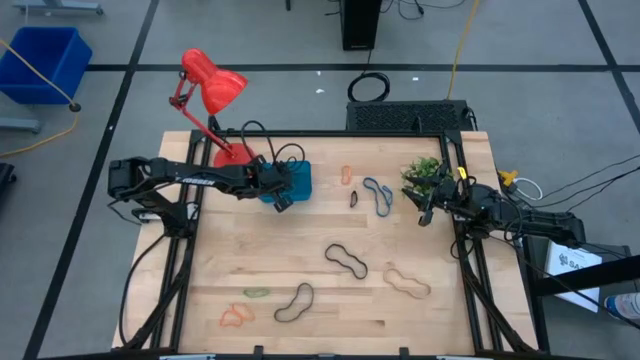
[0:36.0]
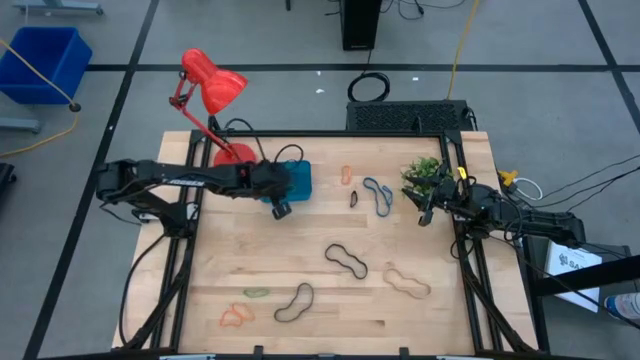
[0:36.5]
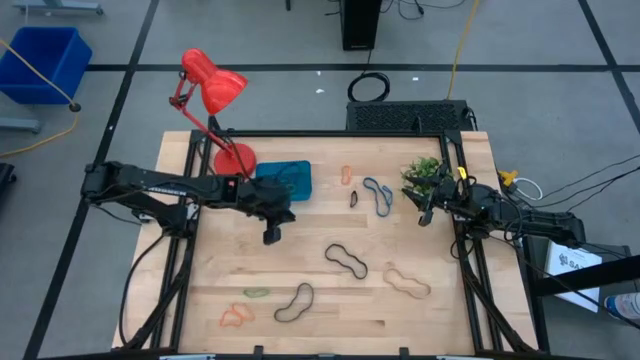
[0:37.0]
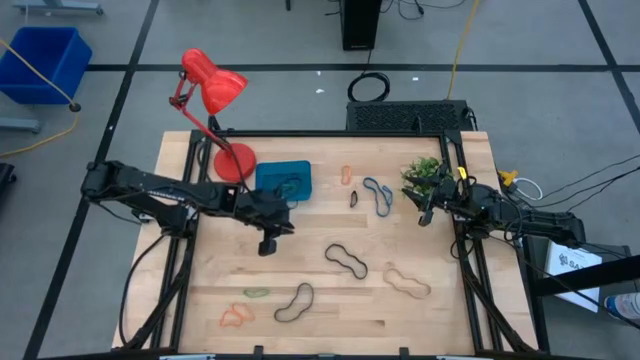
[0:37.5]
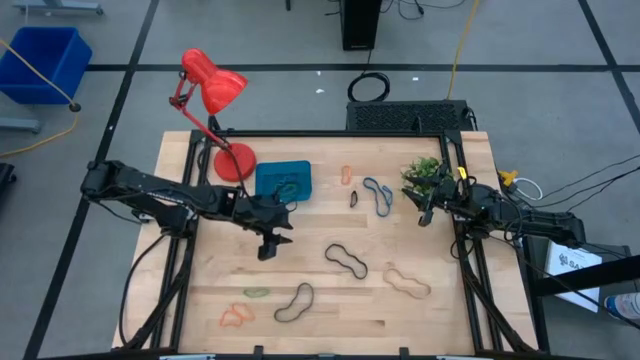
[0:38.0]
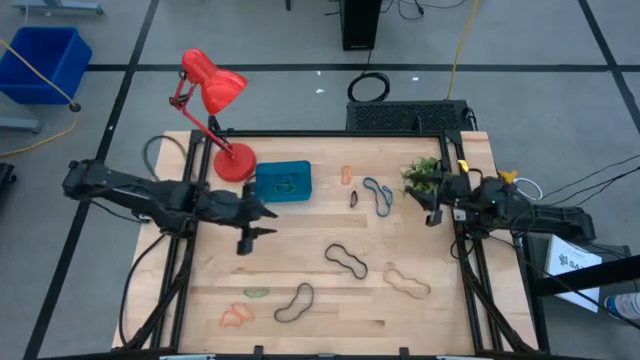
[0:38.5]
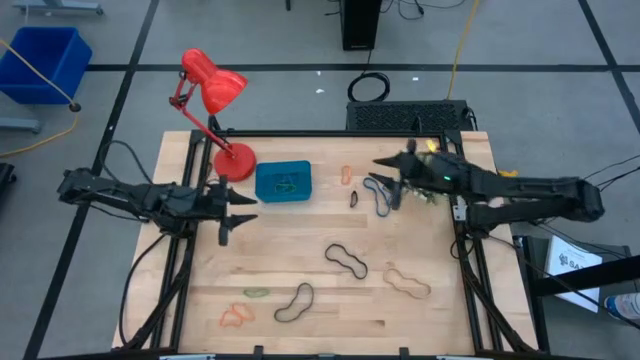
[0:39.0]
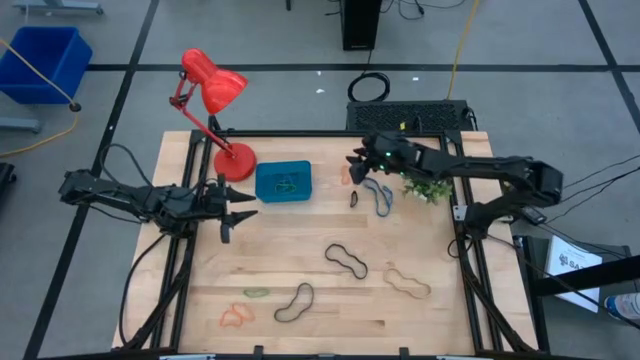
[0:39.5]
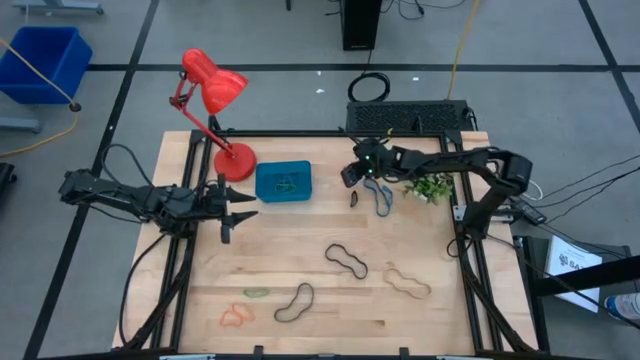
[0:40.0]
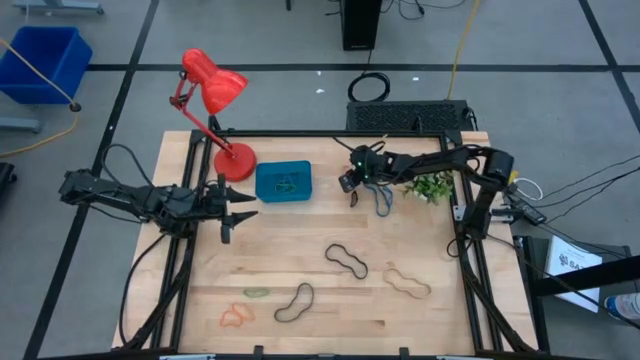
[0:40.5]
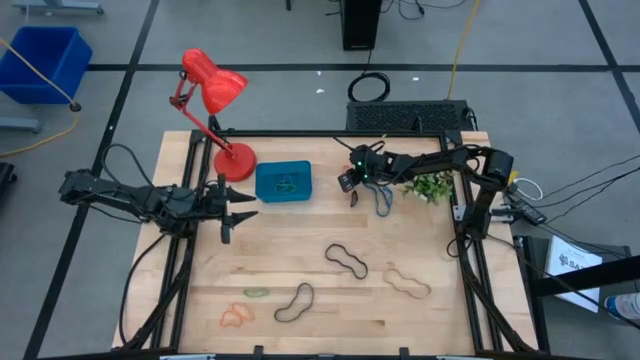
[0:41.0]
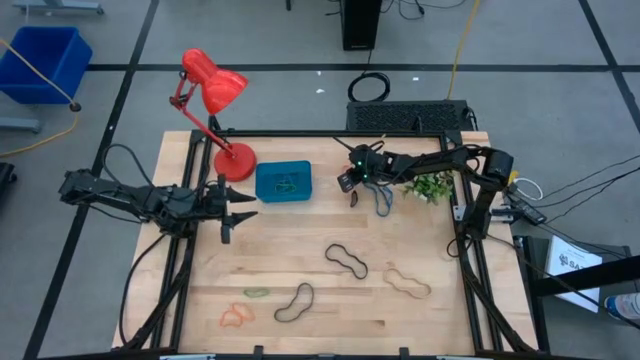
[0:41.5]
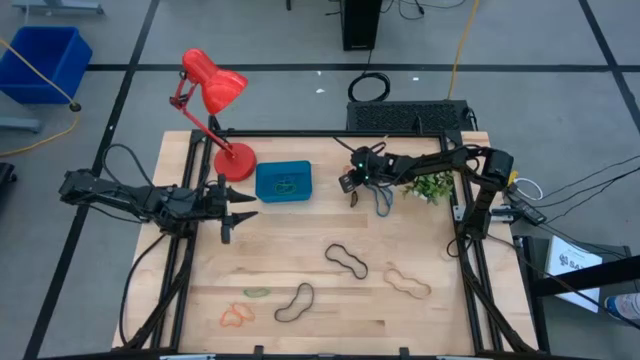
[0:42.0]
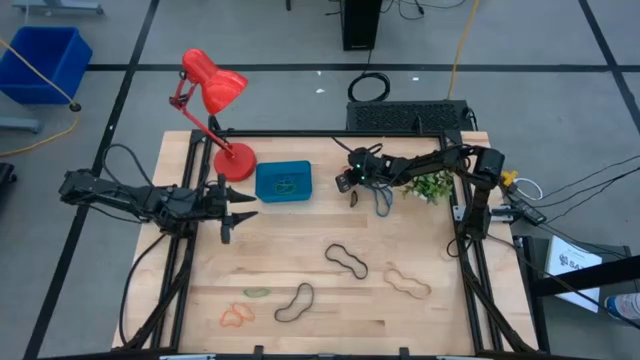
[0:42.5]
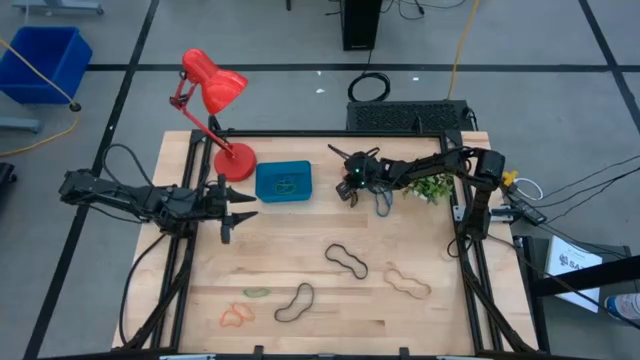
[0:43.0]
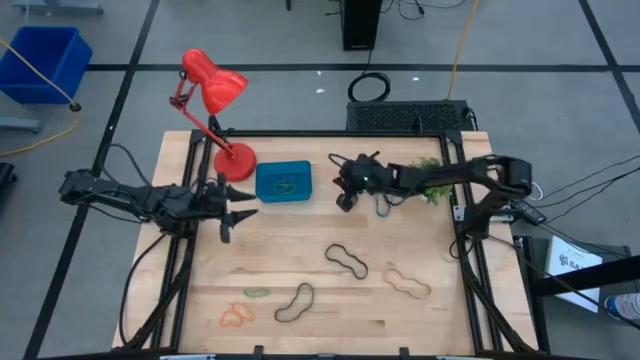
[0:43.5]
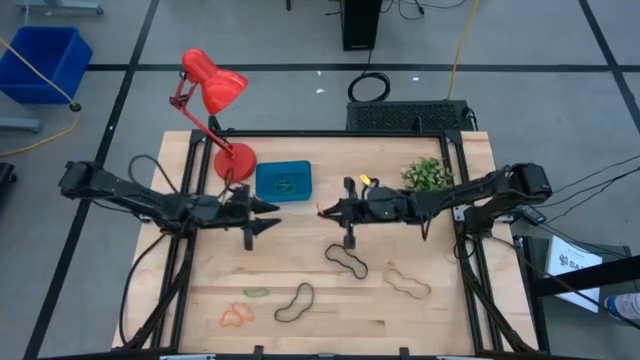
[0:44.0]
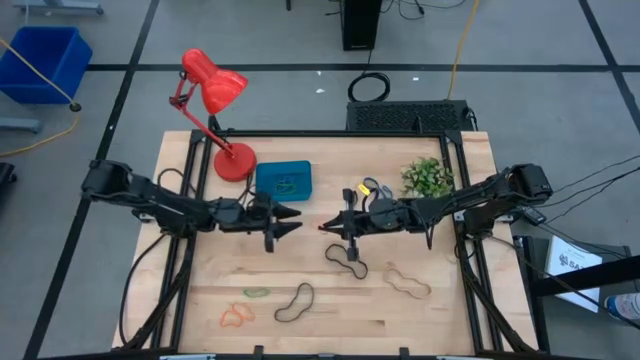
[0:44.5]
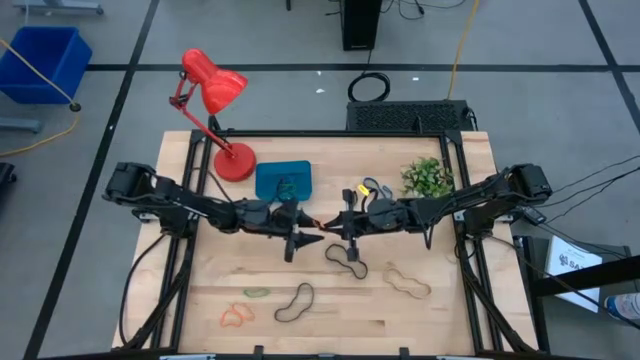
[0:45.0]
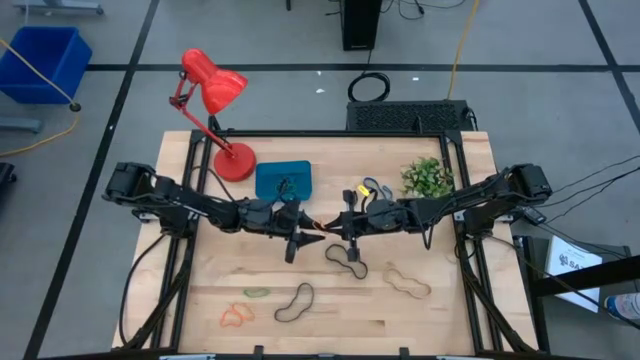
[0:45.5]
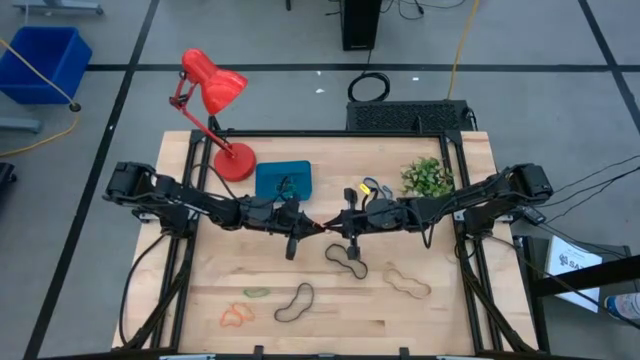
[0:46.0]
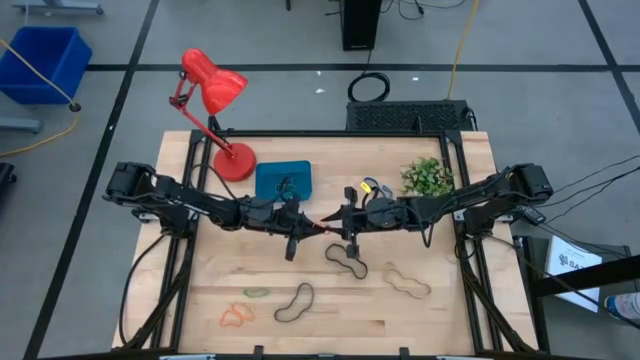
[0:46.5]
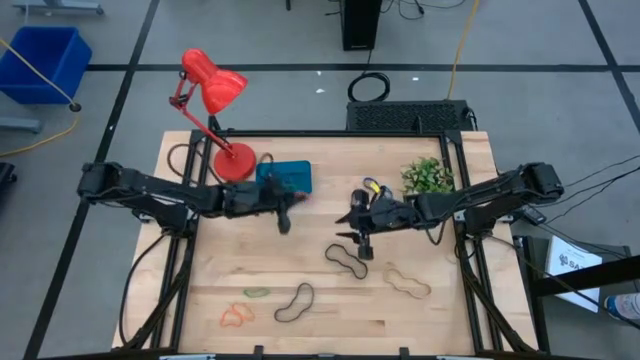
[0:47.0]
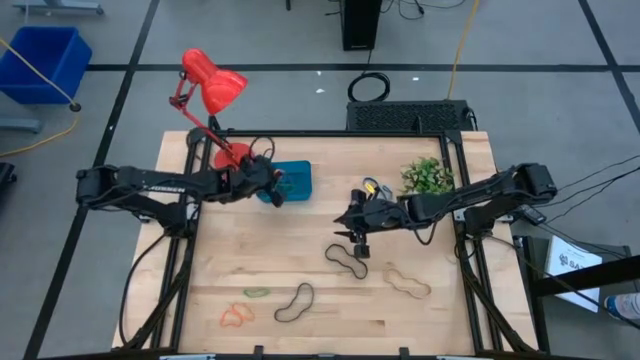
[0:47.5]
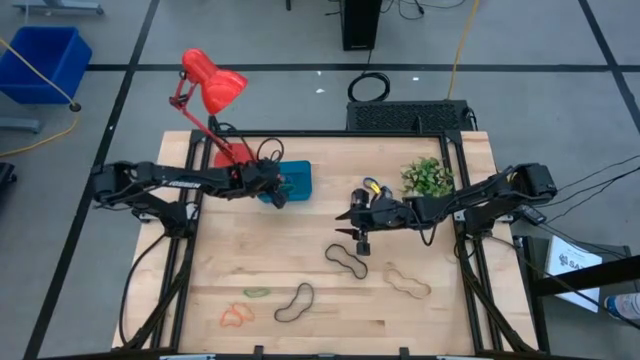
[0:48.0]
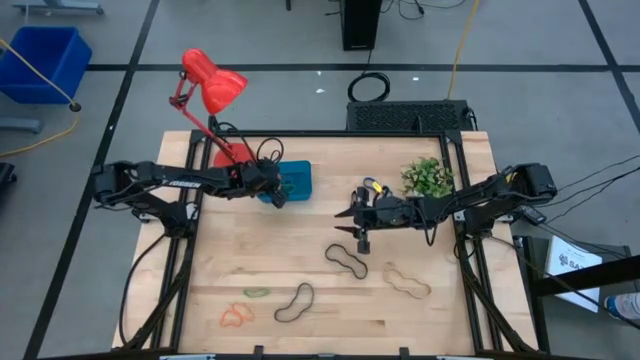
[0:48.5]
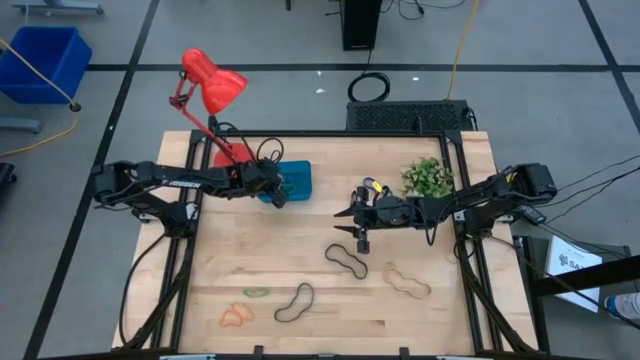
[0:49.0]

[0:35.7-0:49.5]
Task: Pick and place rubber bands into bin
Put the orange rubber band into the blue bin

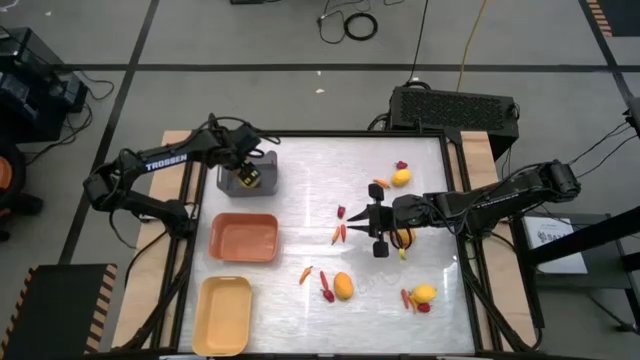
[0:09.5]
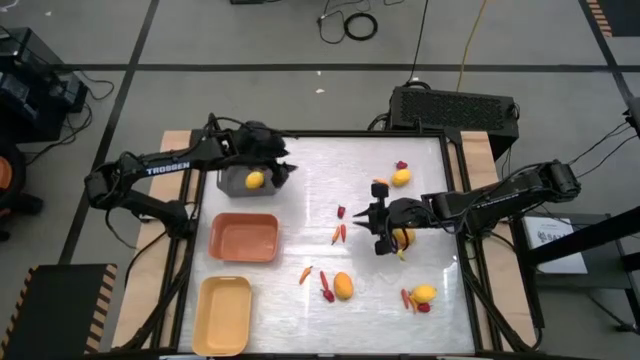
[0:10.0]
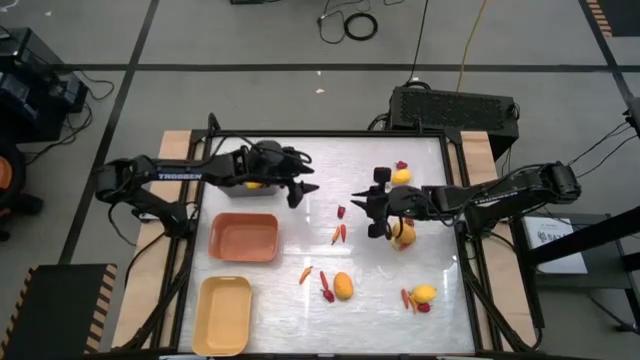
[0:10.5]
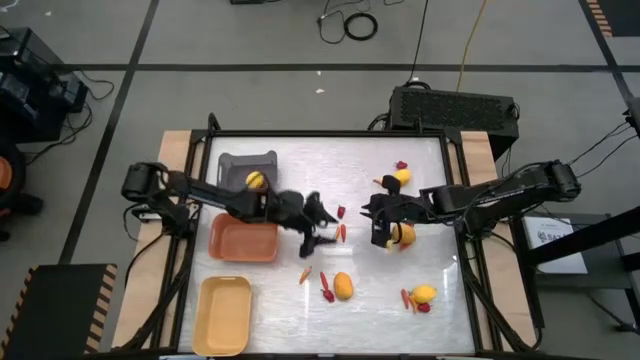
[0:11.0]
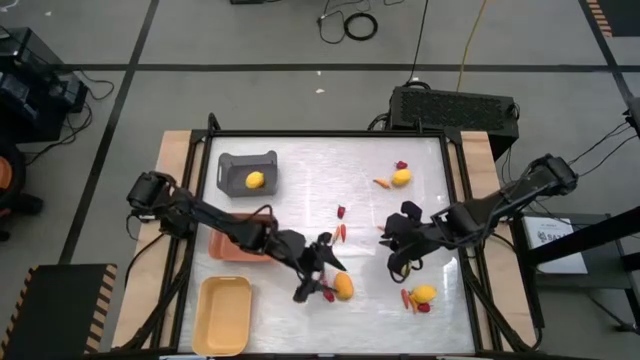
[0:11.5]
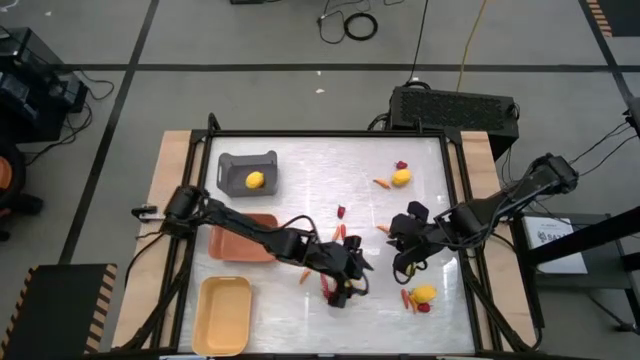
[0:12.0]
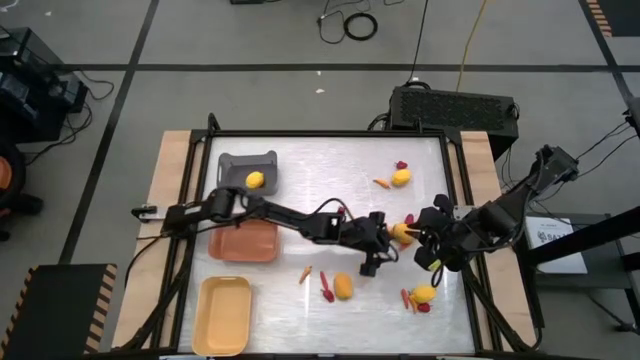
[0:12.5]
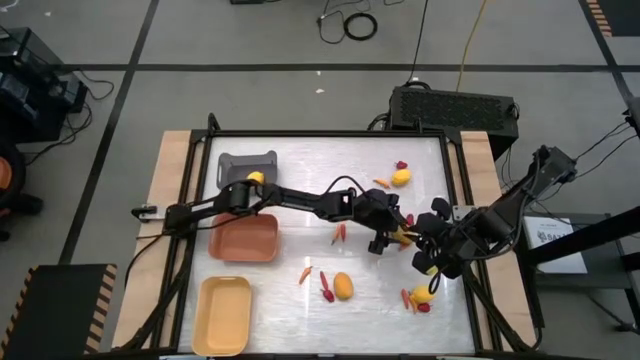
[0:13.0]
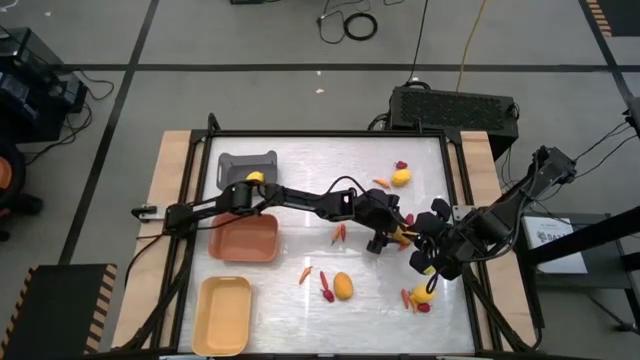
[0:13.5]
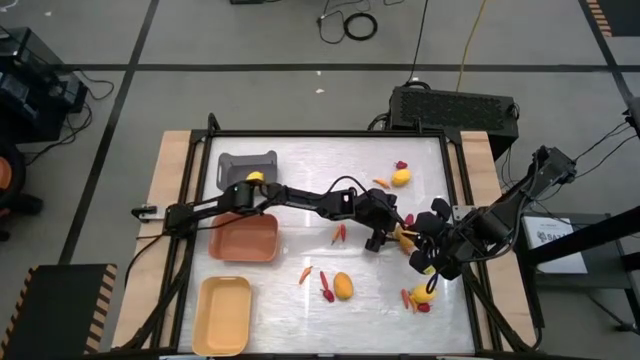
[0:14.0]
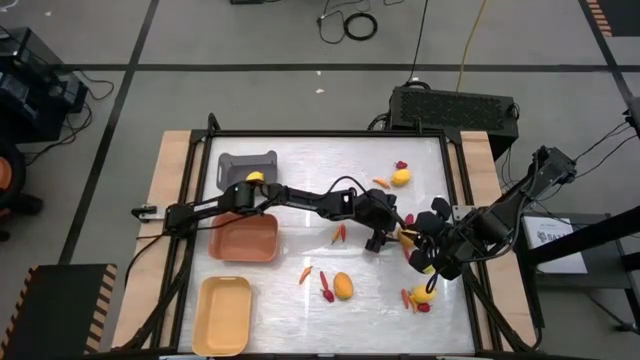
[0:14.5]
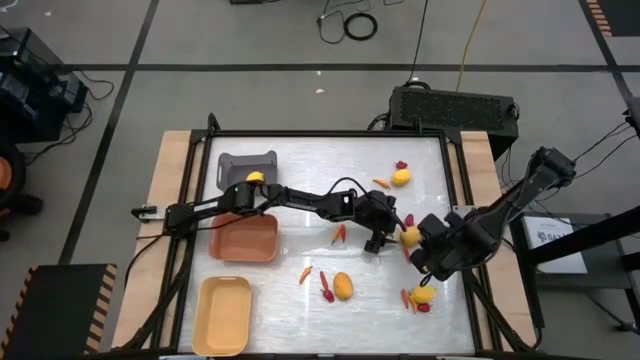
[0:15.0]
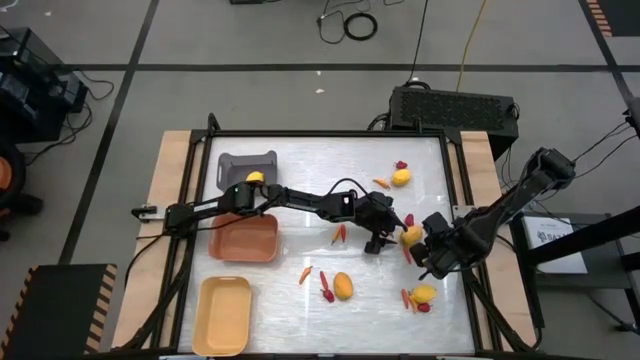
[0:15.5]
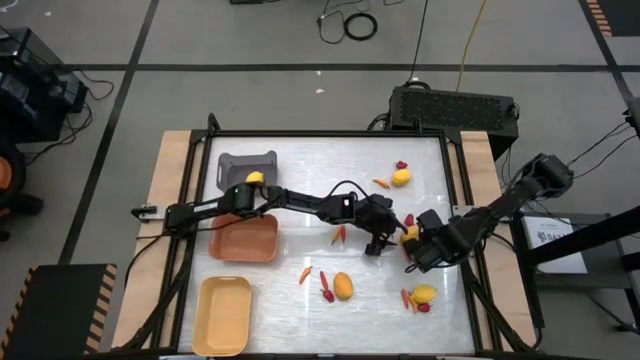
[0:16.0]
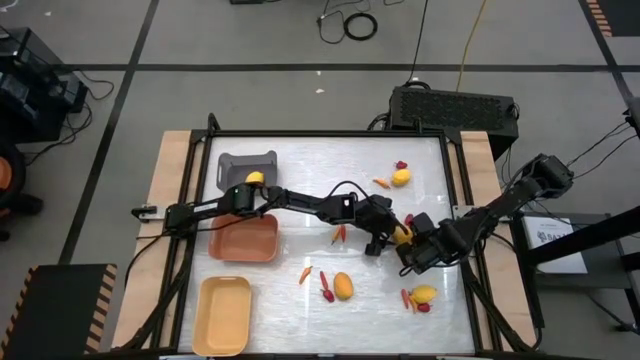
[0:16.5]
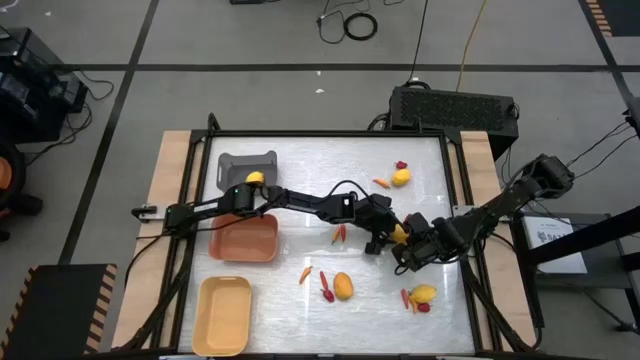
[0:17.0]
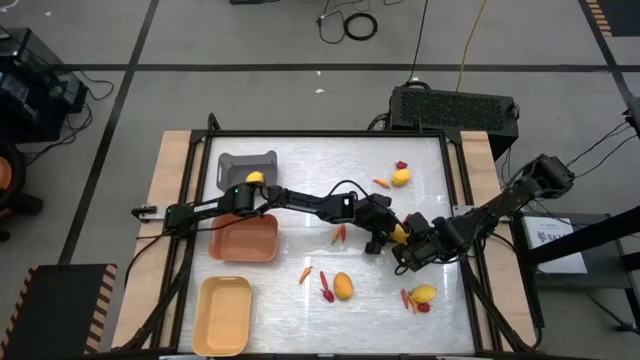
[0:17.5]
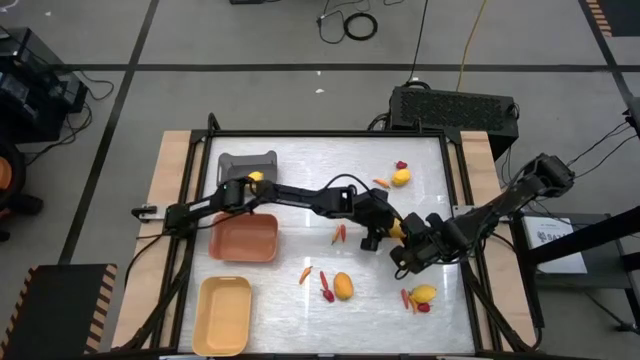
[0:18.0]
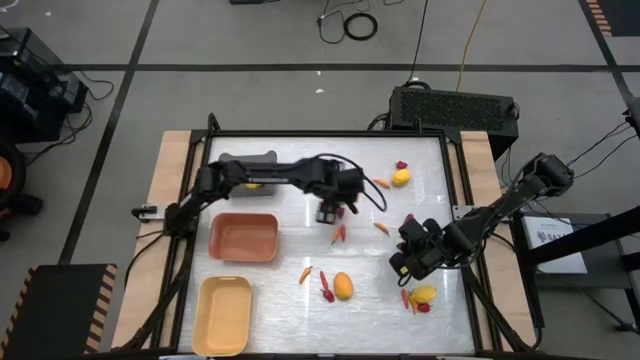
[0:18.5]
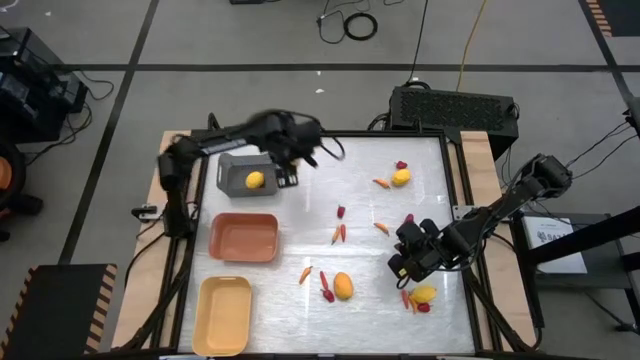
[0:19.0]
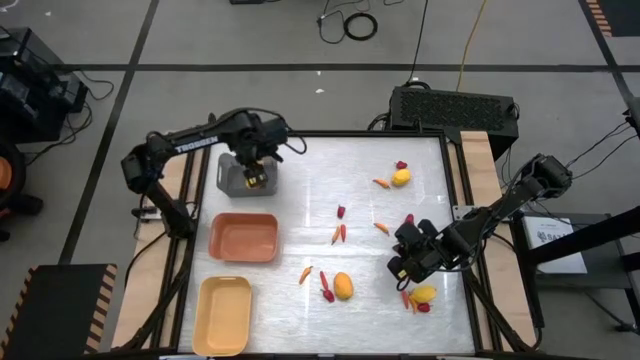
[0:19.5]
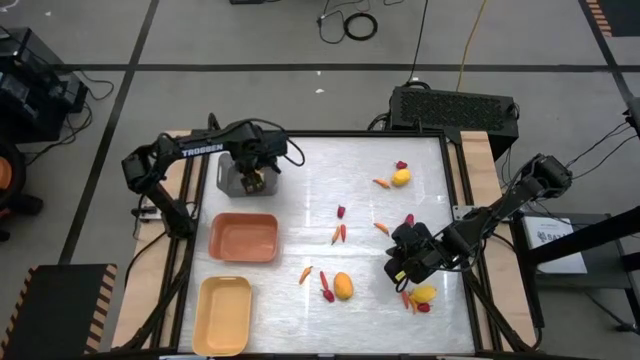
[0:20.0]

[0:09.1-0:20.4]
Task: Sort produce into baskets
Put the lemon into the black bin
